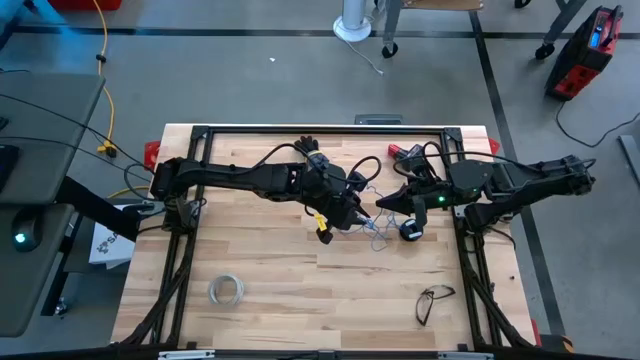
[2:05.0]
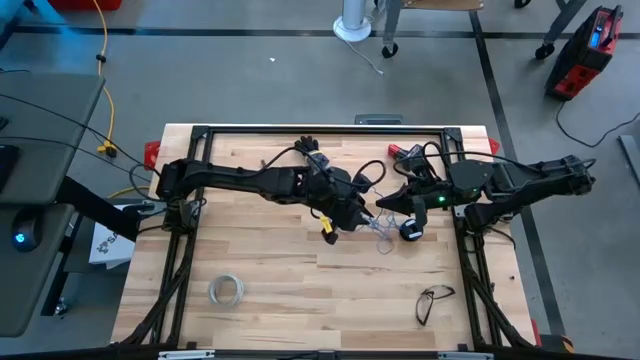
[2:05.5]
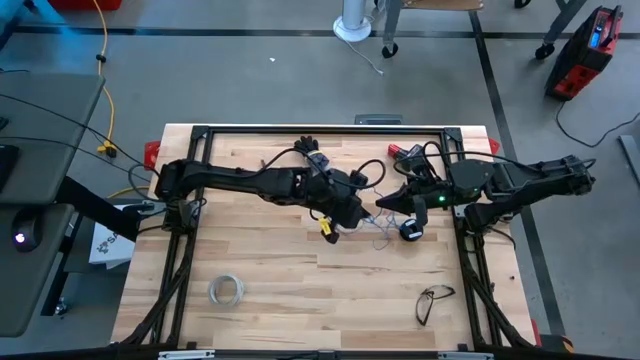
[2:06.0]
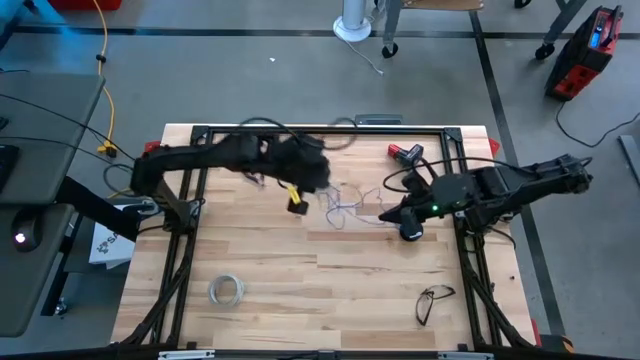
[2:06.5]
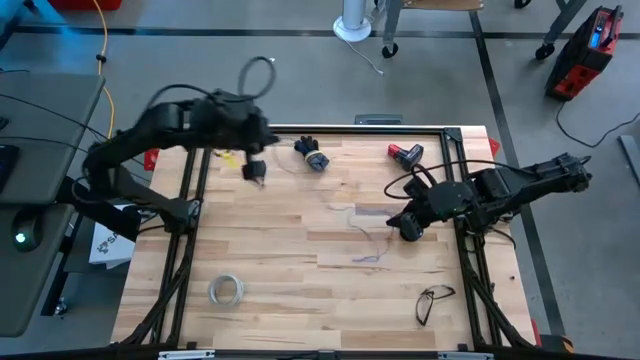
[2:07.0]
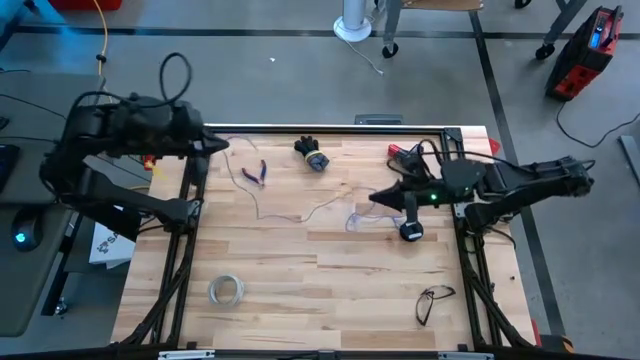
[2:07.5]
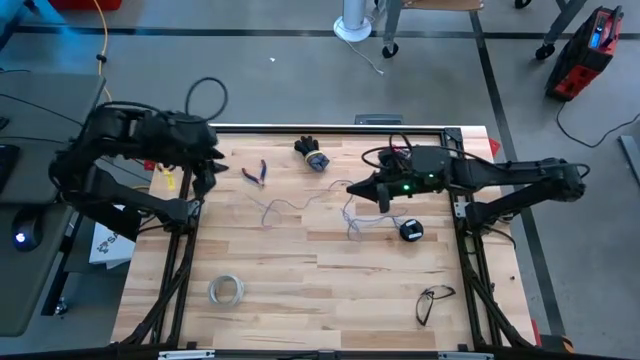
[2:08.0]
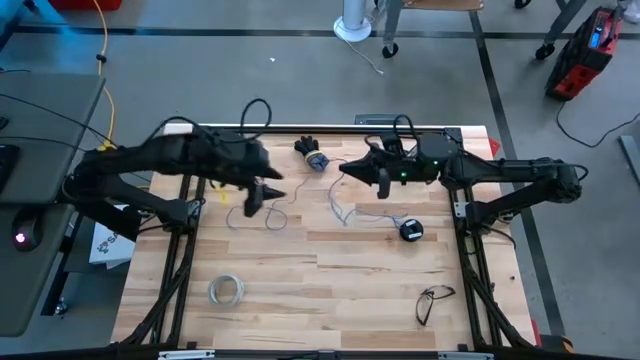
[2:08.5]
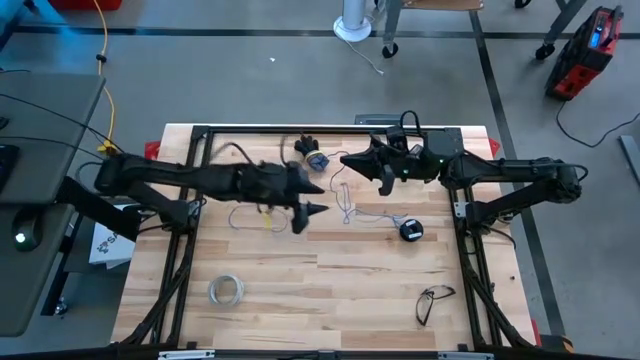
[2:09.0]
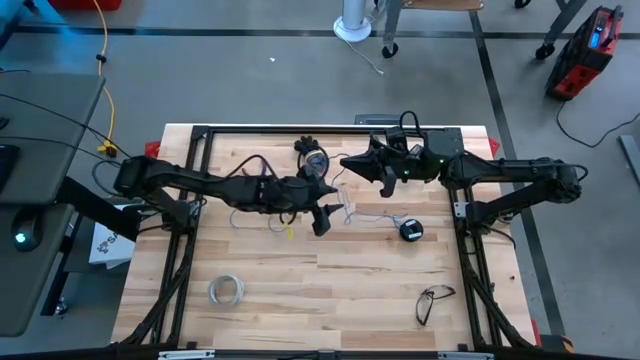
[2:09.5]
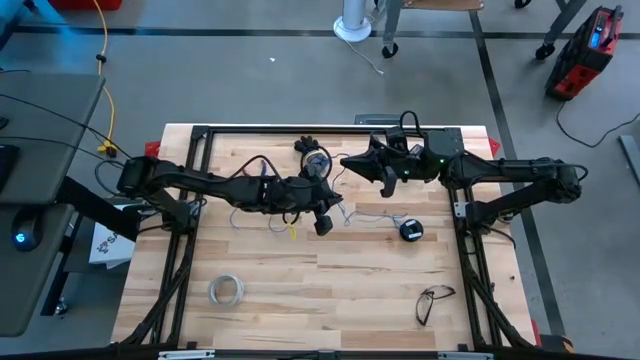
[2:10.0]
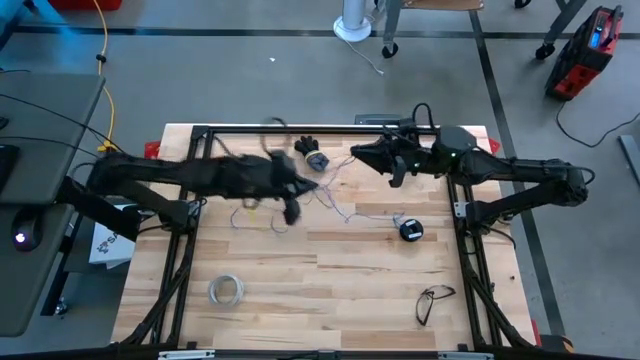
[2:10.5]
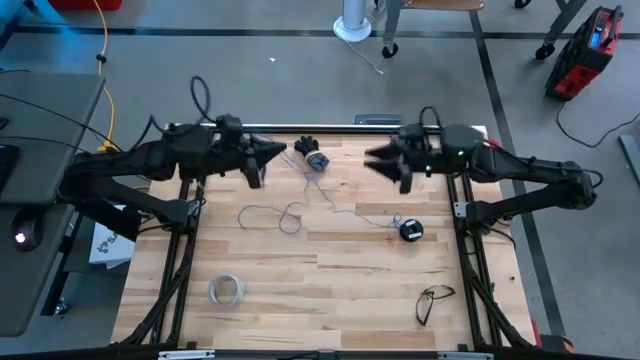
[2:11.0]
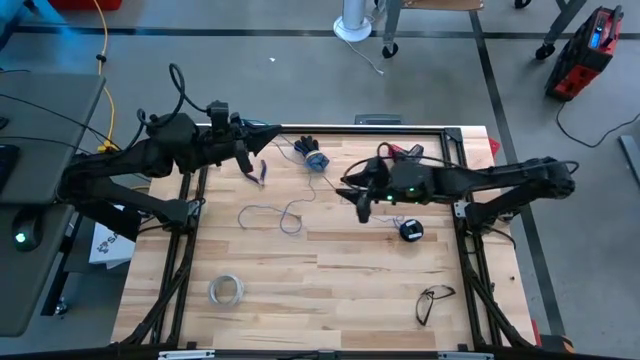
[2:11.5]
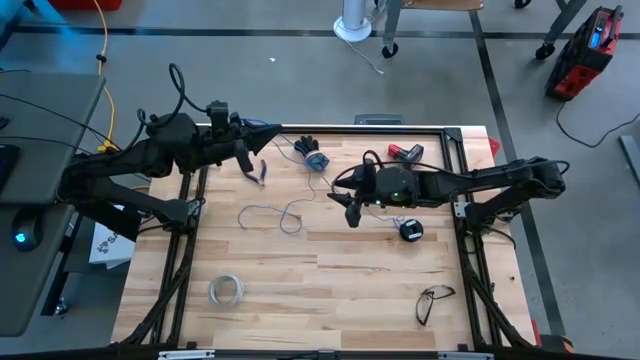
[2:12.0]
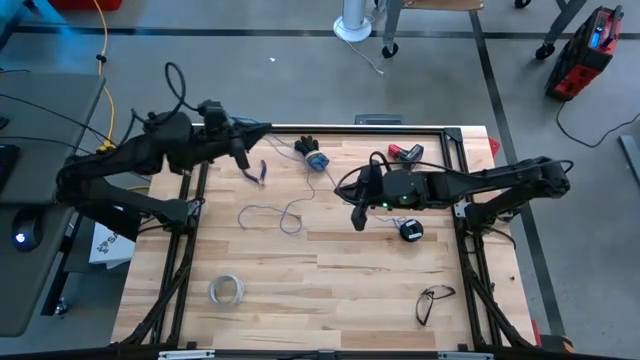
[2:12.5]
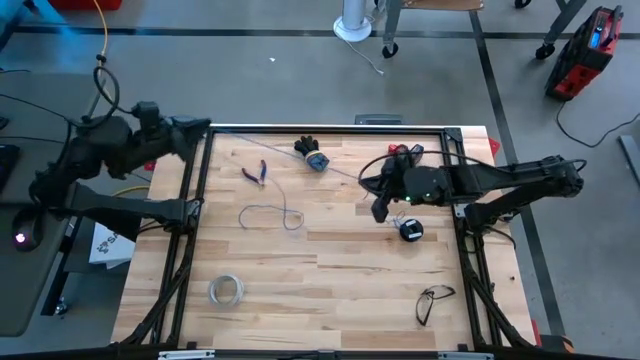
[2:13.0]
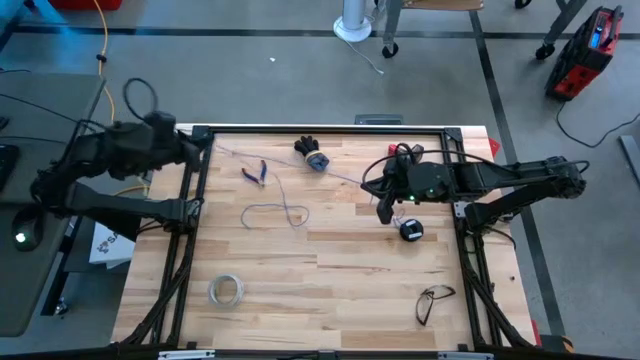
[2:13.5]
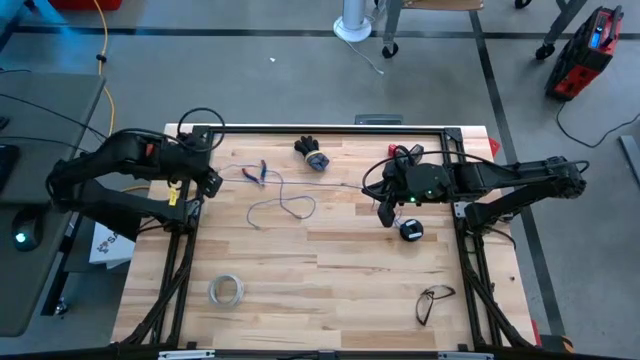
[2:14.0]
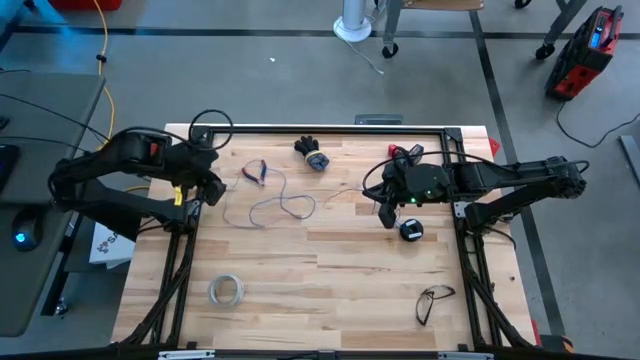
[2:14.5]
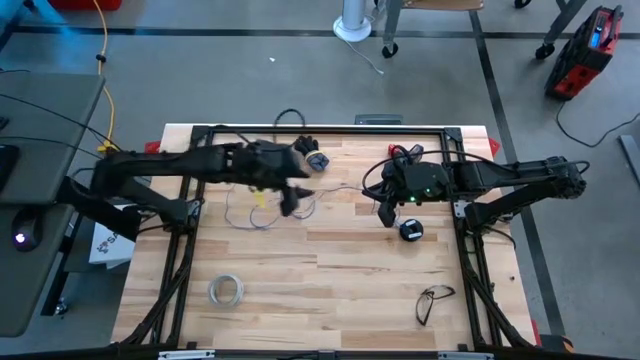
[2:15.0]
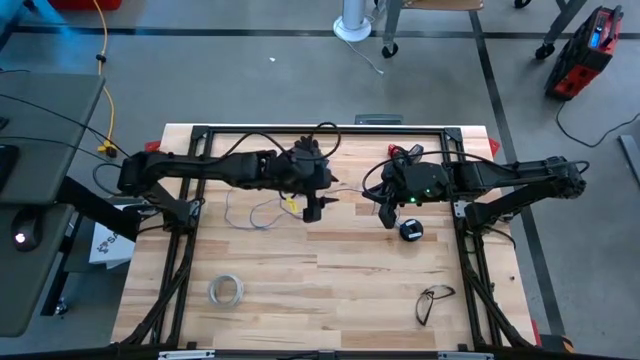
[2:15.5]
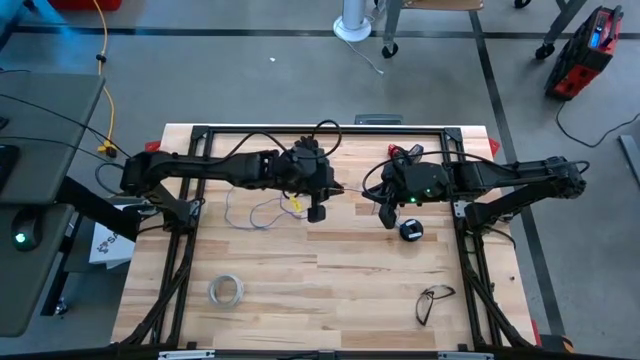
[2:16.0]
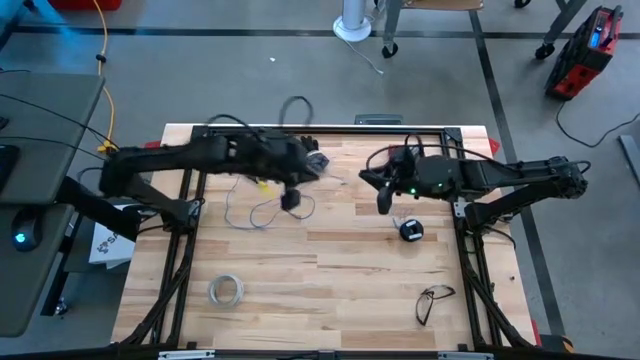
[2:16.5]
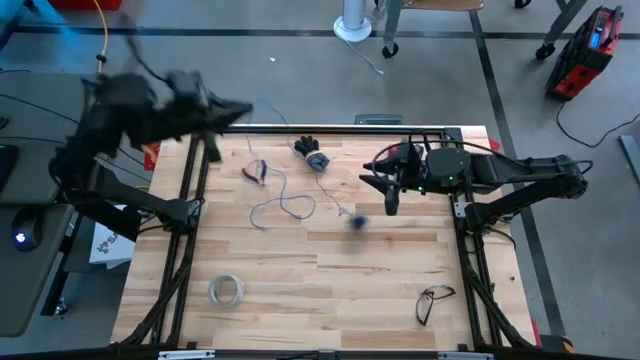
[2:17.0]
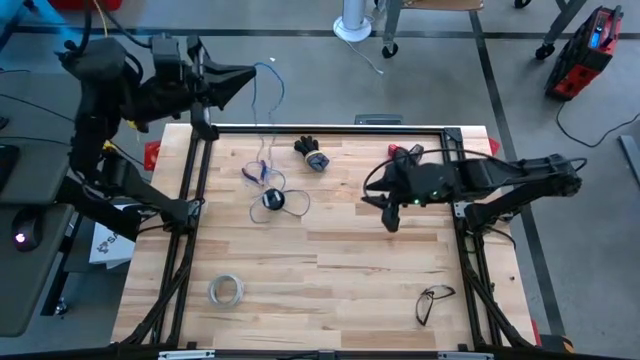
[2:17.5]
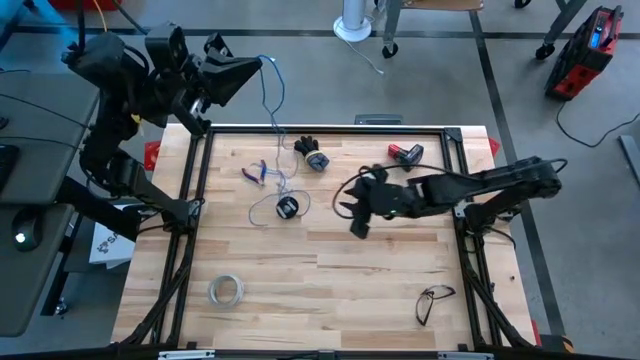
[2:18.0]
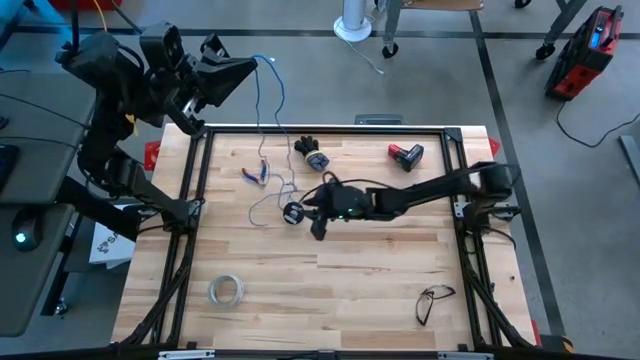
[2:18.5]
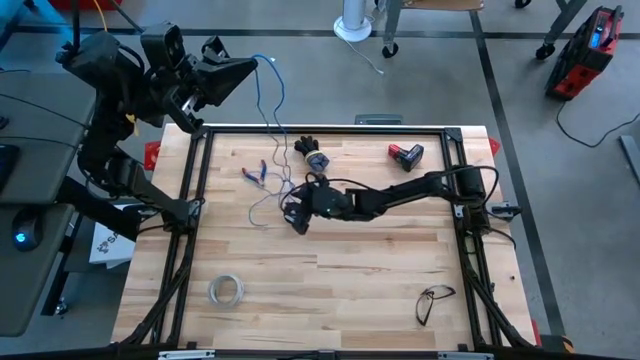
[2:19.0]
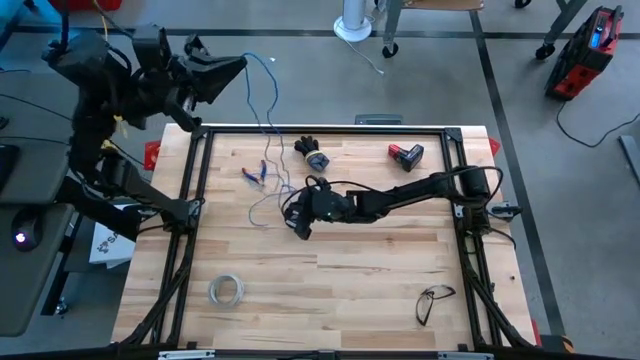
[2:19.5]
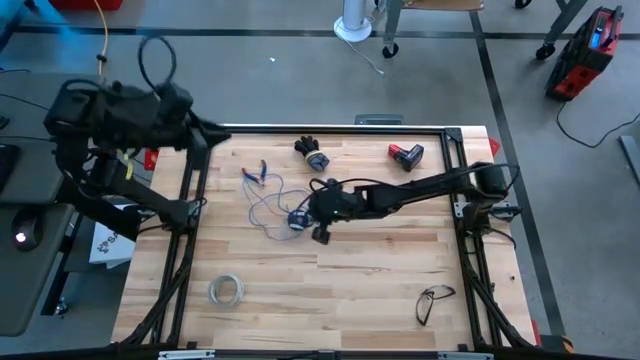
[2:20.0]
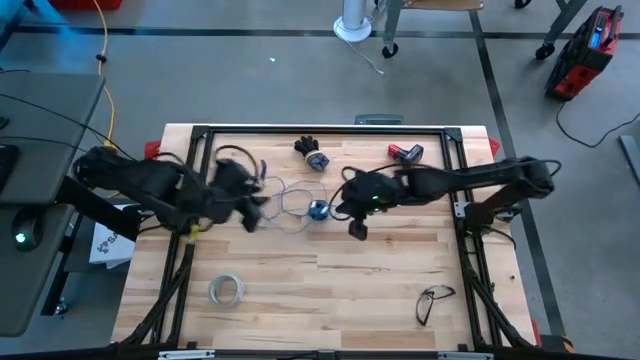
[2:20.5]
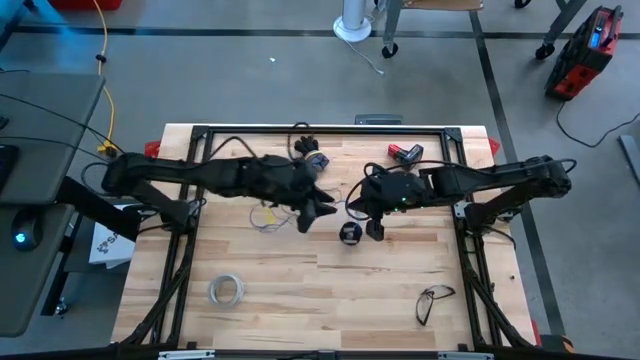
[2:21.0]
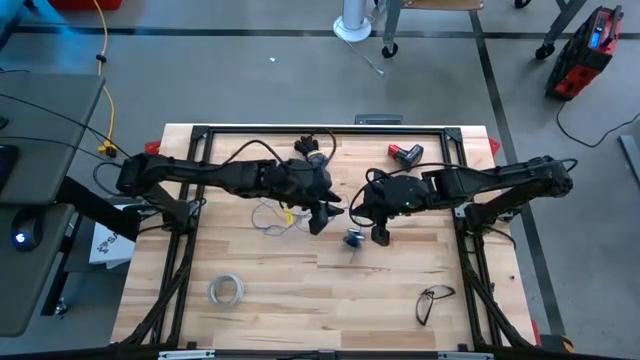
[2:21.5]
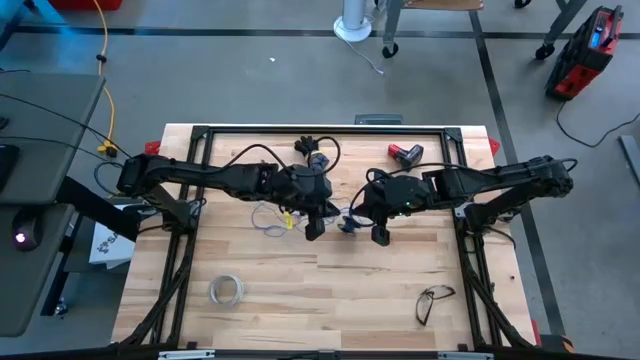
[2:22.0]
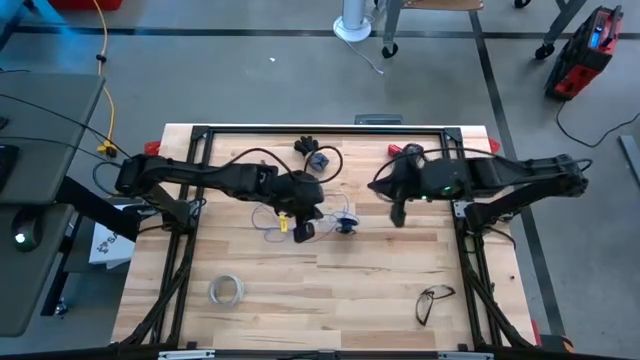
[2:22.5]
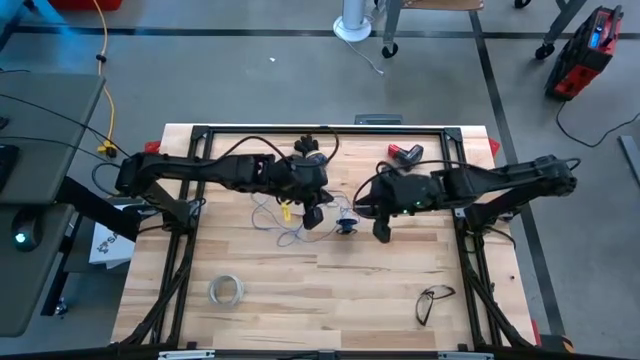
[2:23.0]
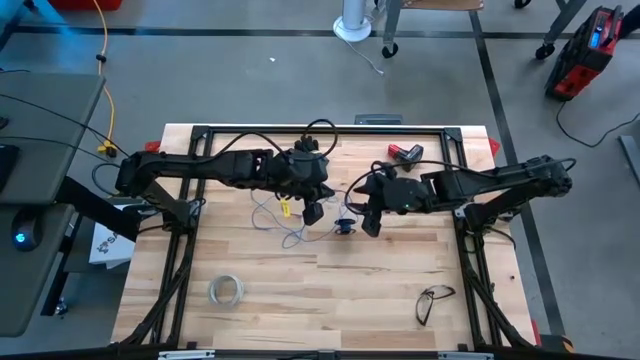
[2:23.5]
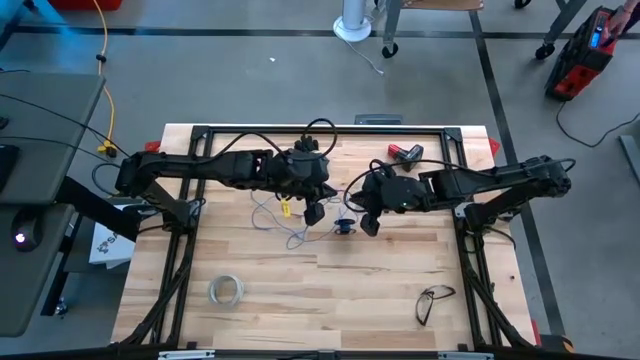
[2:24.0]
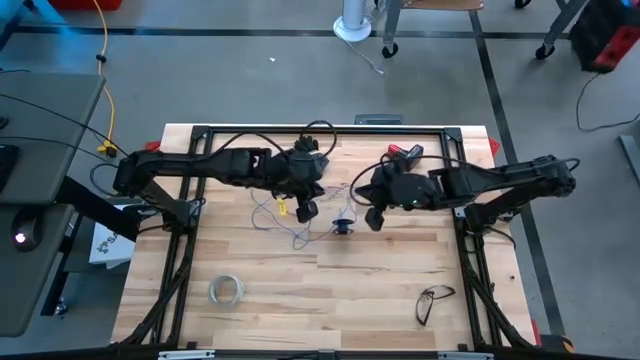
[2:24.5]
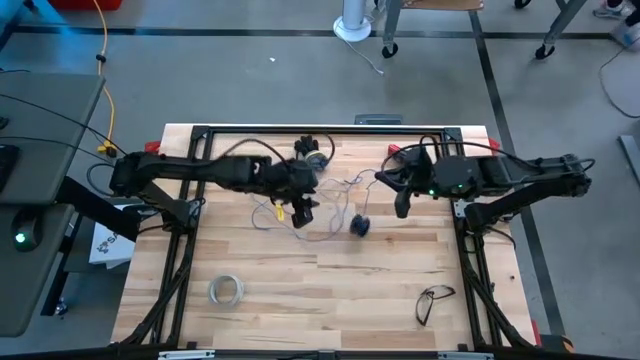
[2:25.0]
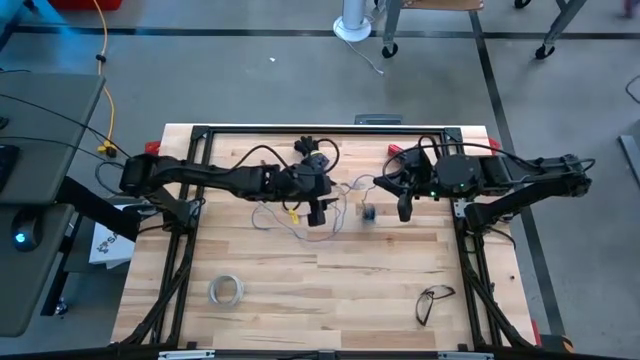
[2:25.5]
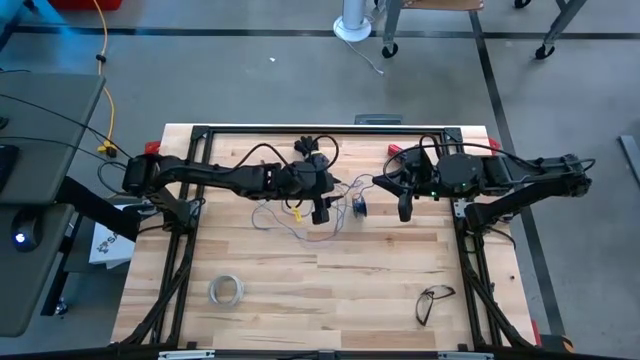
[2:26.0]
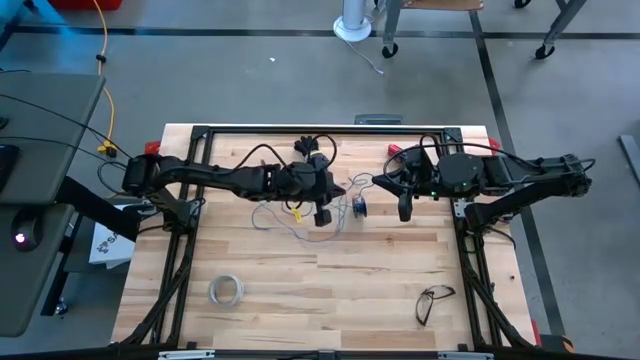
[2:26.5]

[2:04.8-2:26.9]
Task: Coil cords
Uncoil the blue wire from the black spool
